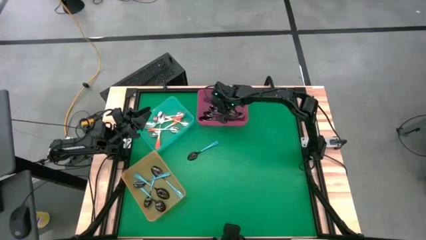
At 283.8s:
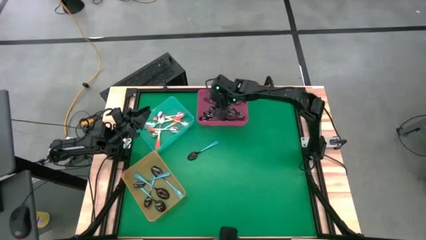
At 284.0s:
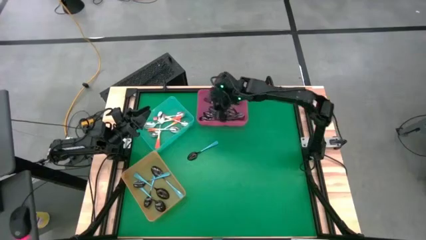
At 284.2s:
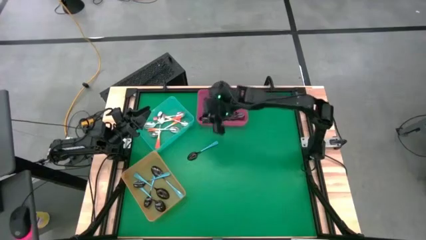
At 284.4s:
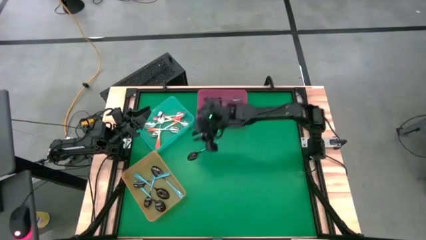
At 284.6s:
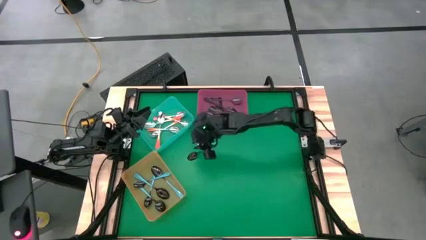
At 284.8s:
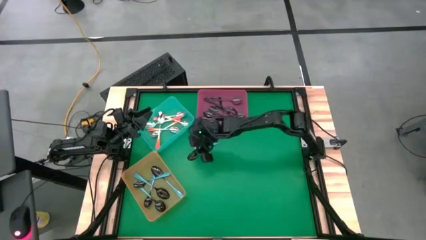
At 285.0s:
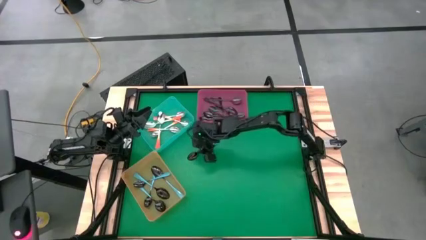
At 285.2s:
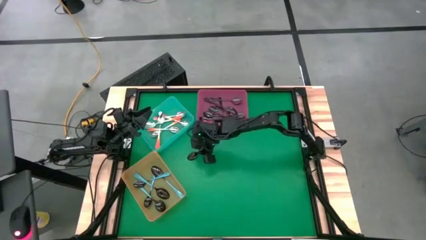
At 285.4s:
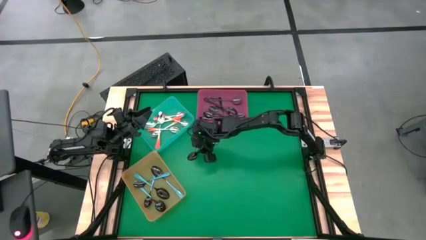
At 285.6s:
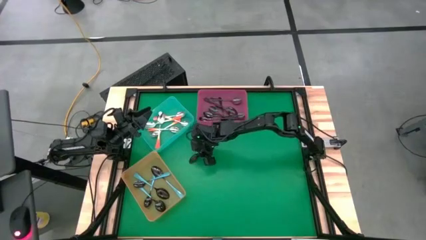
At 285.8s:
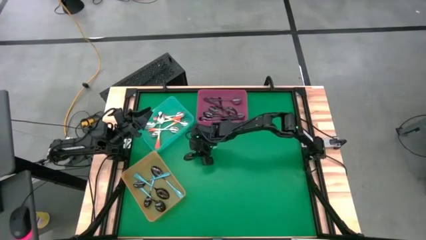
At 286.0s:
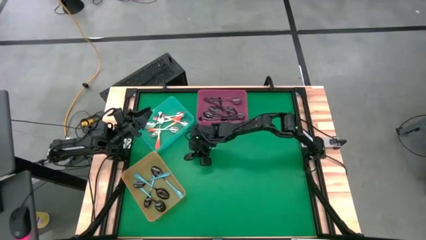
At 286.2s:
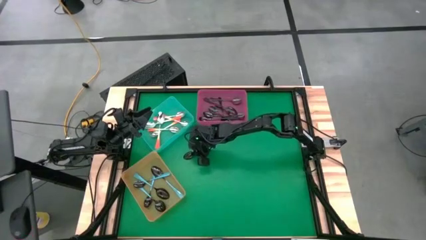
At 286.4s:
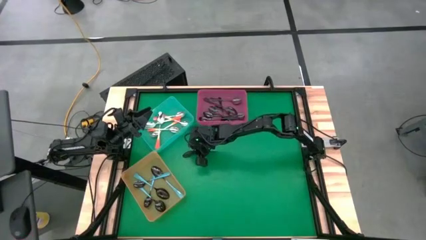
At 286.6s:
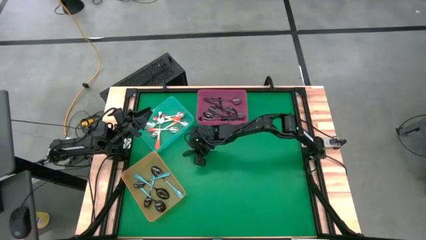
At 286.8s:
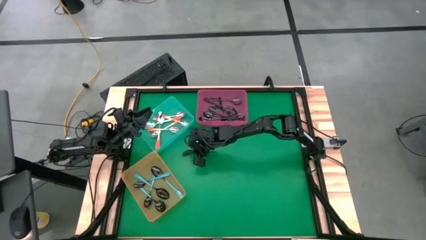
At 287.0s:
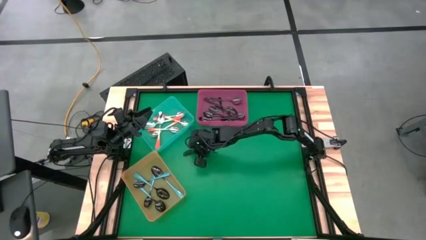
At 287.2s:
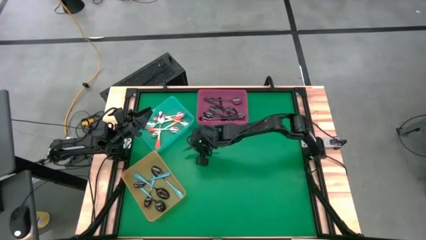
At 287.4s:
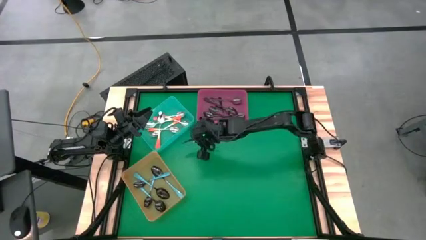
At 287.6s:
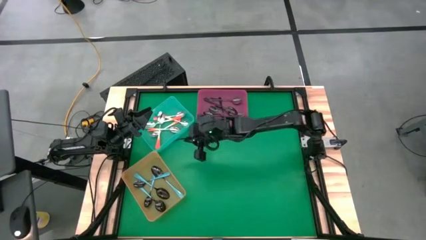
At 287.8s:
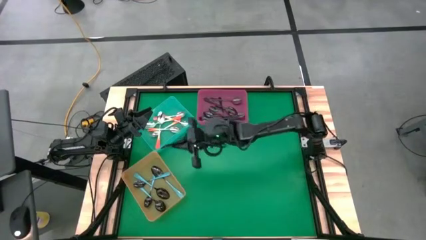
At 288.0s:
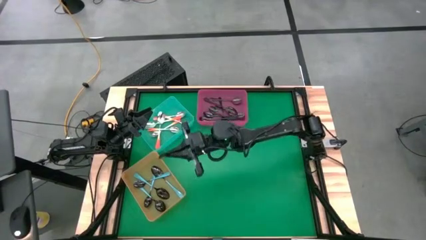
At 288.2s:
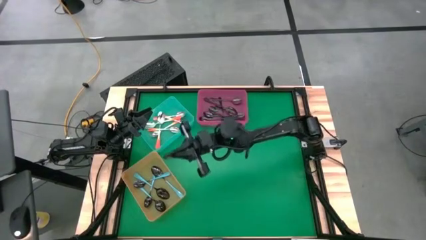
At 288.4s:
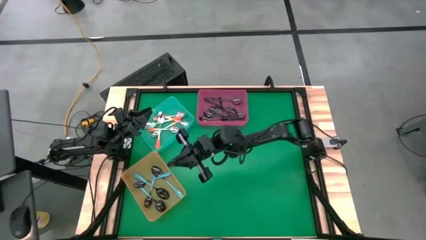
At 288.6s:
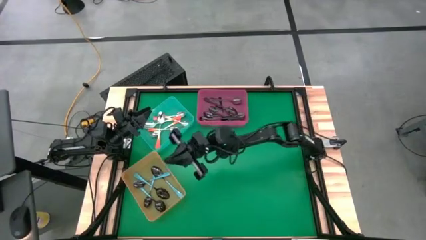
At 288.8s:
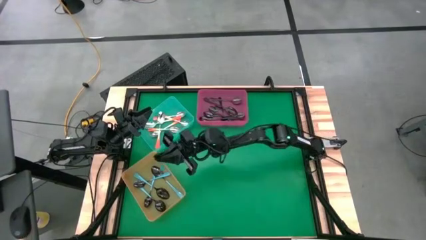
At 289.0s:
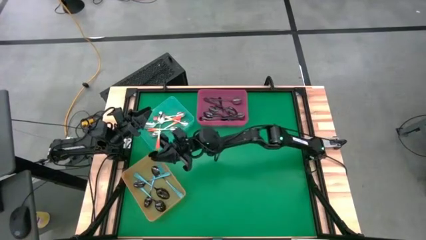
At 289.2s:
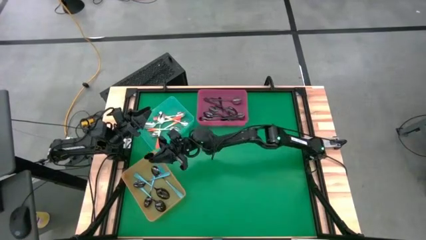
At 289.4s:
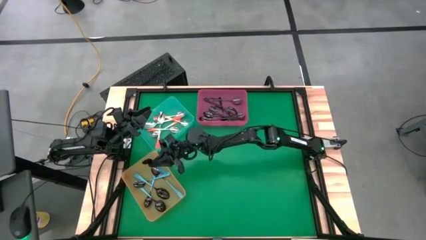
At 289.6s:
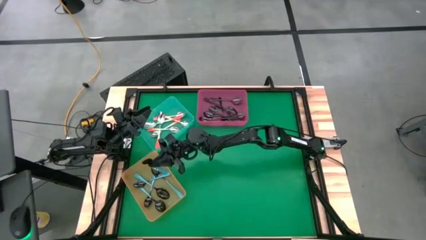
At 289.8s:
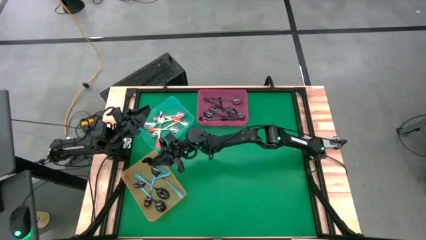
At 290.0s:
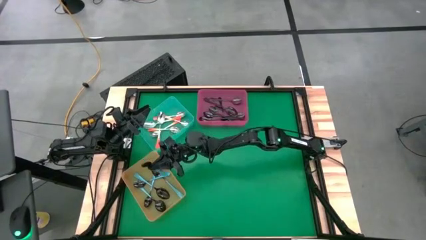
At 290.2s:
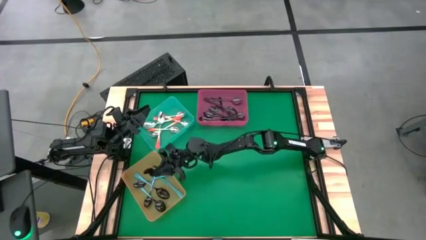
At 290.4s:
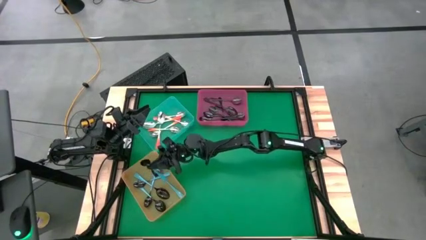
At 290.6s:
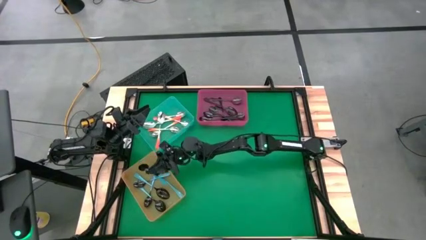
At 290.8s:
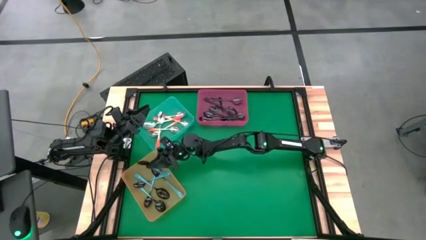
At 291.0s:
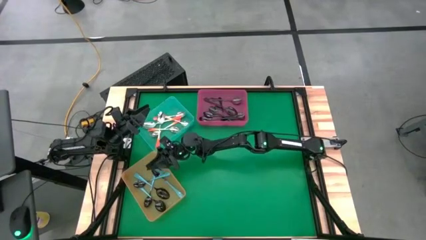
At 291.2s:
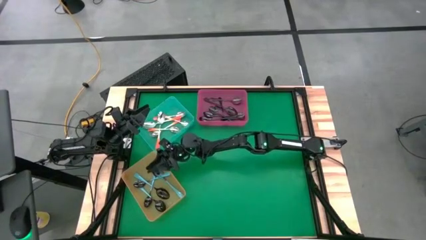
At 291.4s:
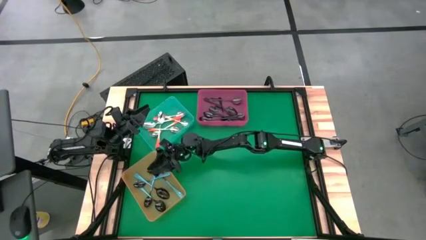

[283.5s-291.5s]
Task: Sort silverware by color (type)
Put the blue spoon into the orange bin

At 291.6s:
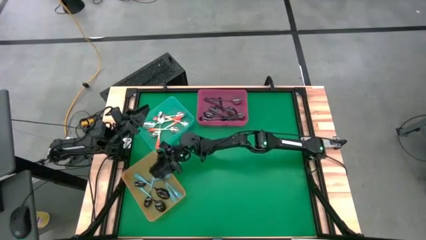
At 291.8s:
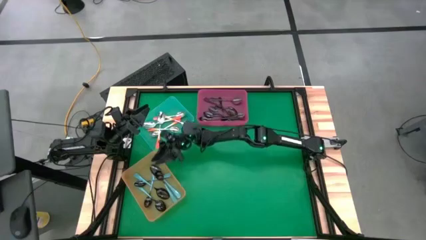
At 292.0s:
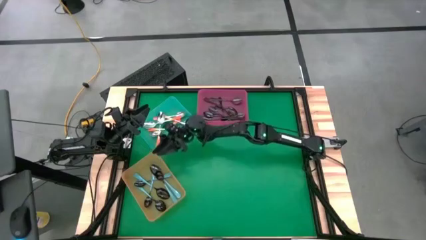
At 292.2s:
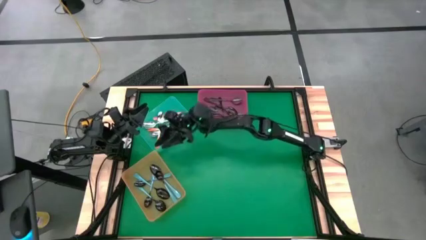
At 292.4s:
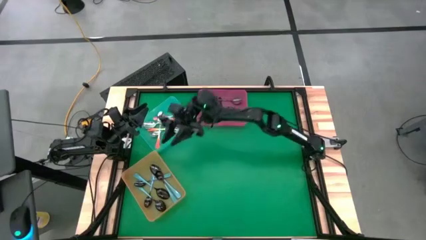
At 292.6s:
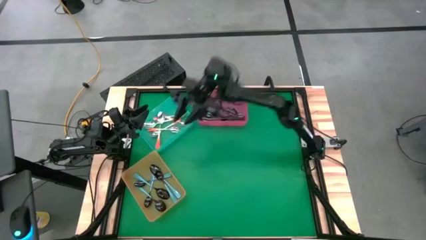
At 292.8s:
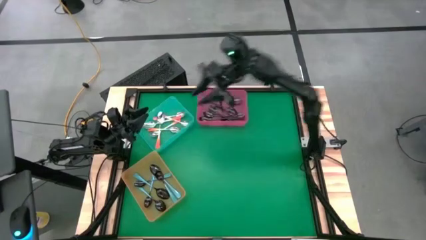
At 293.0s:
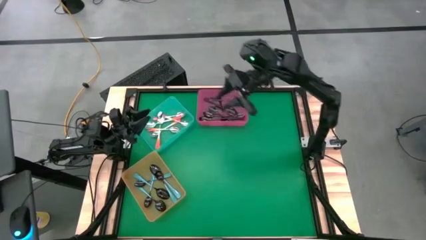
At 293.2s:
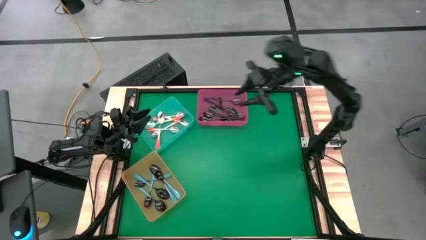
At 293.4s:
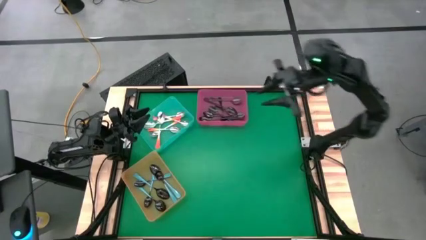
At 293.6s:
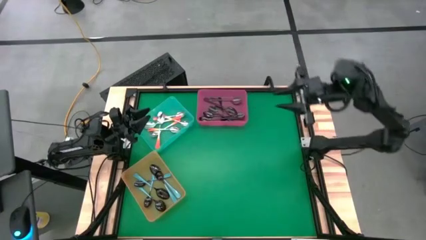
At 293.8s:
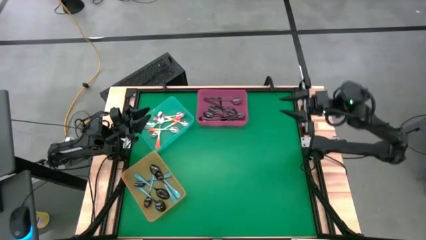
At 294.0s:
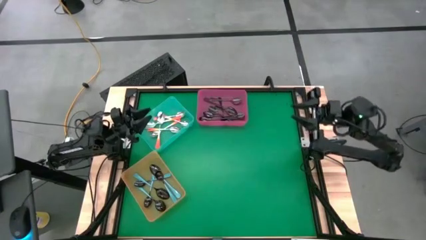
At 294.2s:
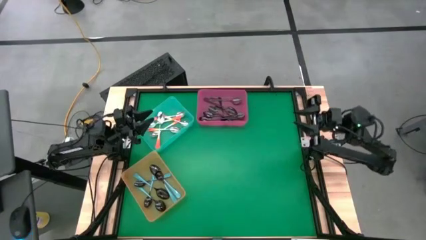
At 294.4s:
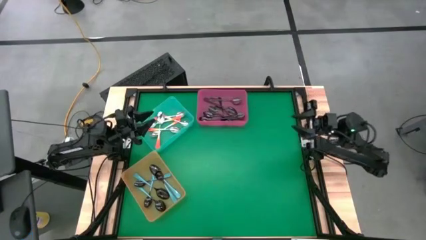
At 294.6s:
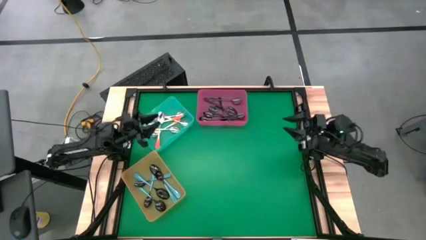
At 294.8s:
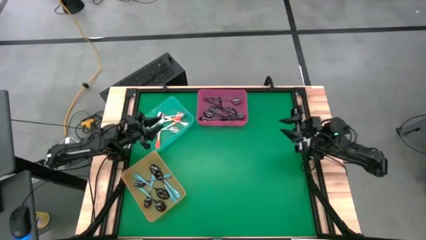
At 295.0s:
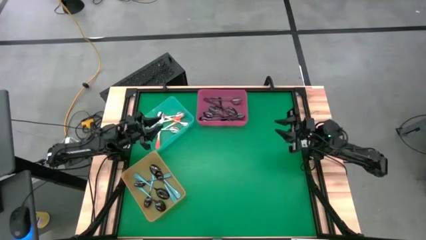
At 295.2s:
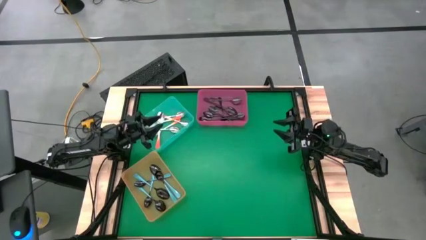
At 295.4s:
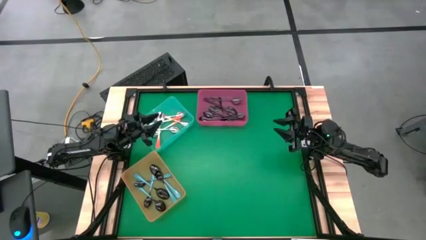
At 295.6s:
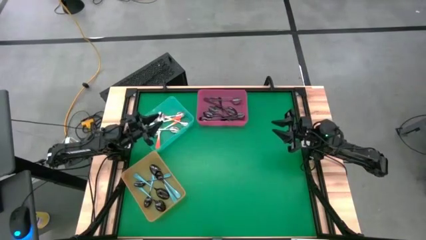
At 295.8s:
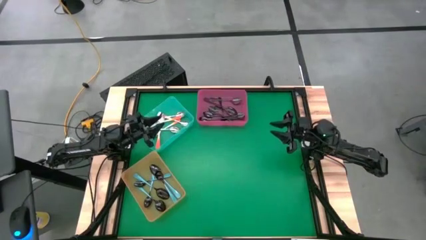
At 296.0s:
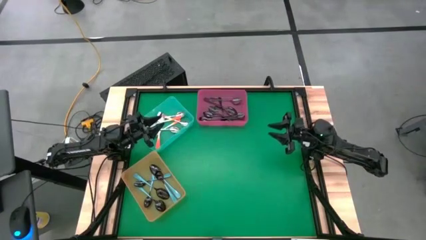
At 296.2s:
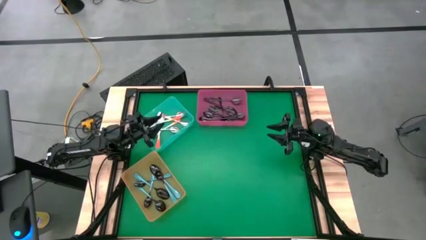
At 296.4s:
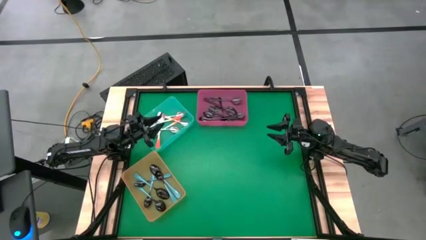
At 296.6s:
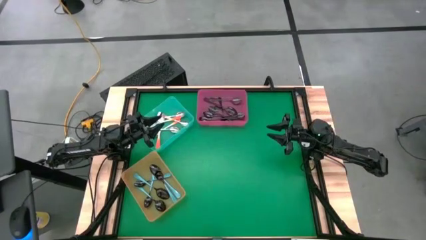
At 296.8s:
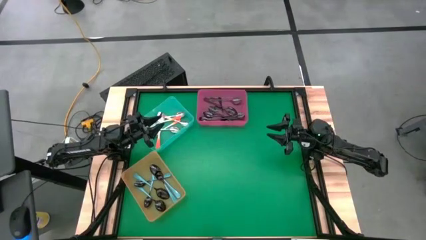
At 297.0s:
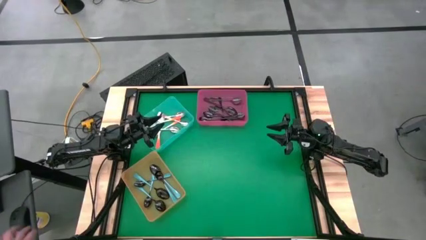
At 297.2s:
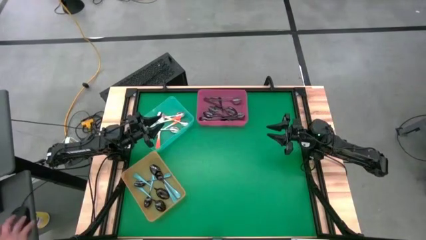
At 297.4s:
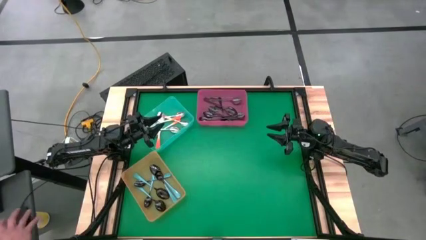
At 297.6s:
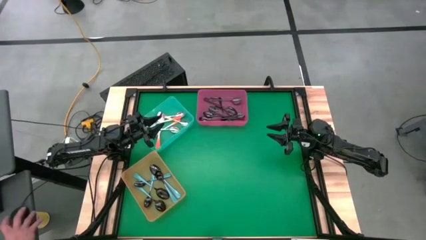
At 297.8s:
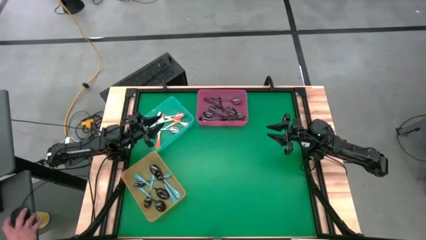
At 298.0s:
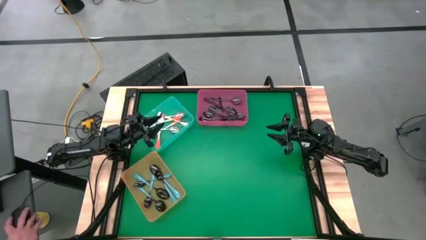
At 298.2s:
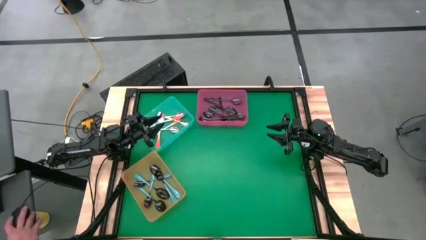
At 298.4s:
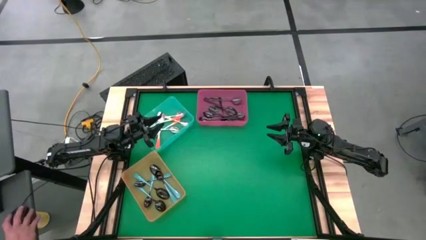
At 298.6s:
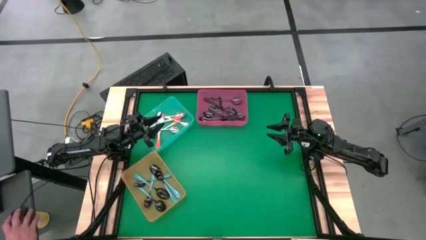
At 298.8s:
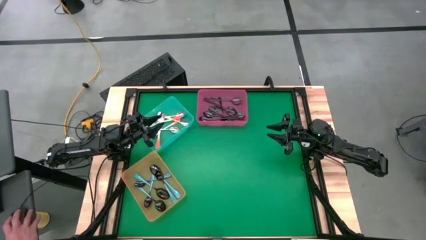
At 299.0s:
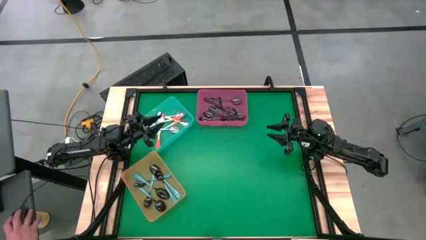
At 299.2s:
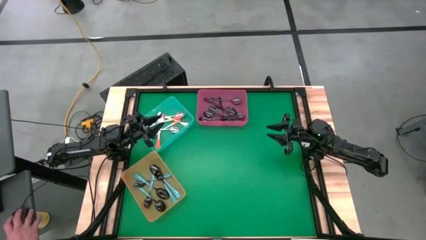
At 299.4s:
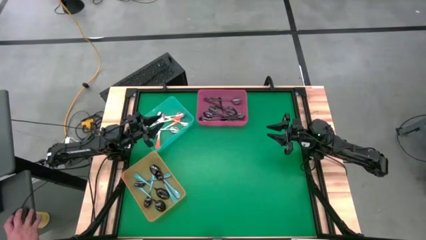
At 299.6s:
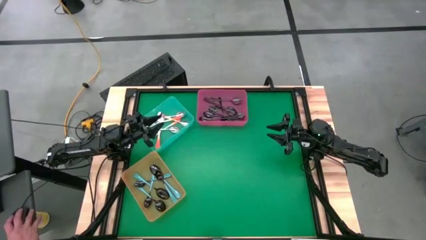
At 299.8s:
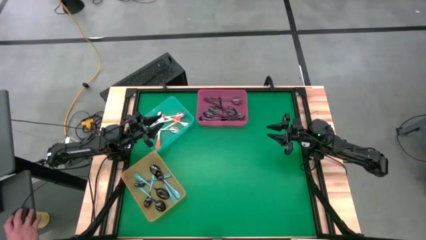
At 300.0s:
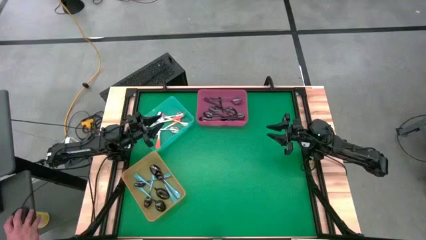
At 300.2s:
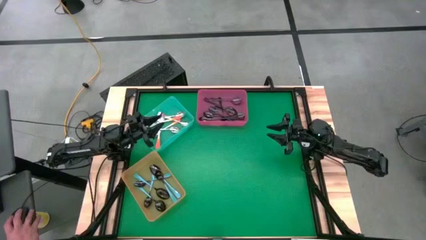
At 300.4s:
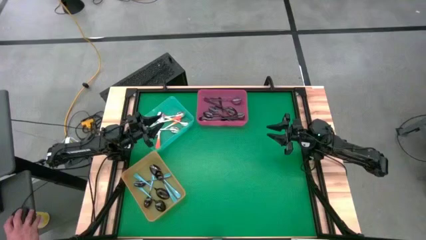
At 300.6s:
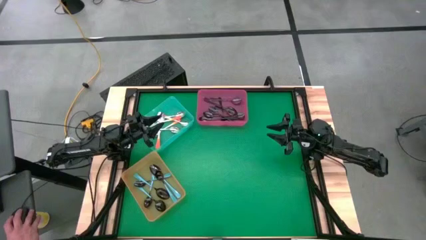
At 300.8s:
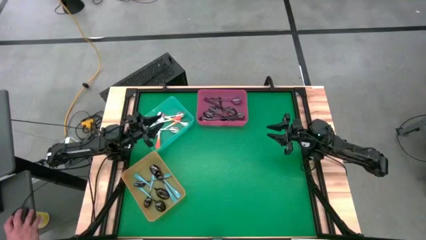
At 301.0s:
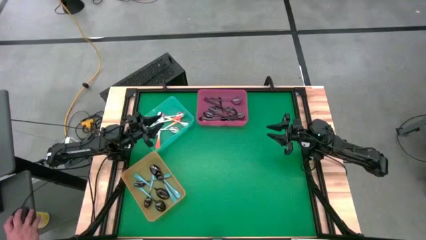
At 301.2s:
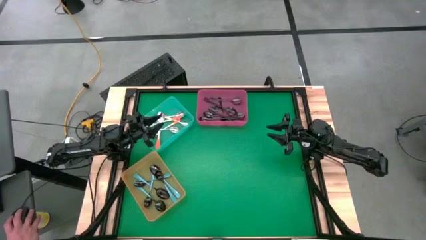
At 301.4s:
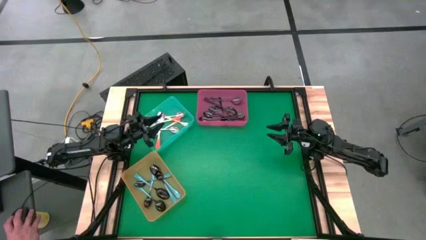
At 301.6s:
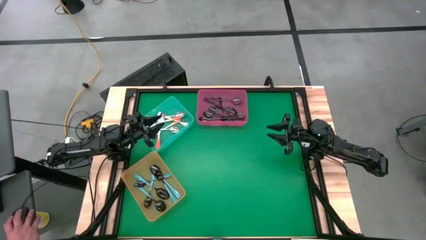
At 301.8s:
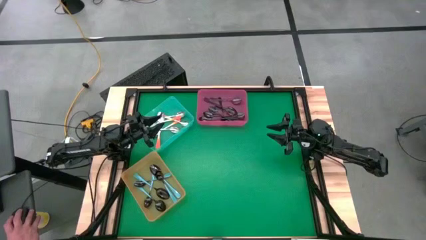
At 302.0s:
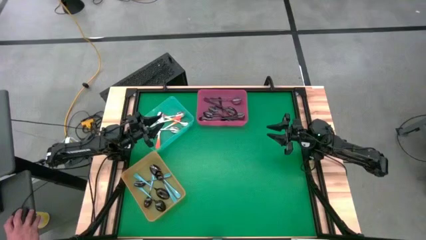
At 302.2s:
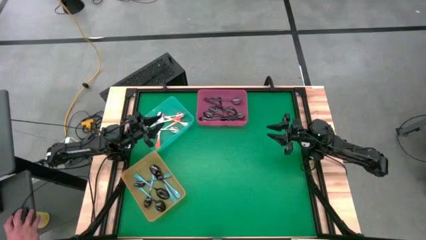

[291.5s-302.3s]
Return to Home Position
